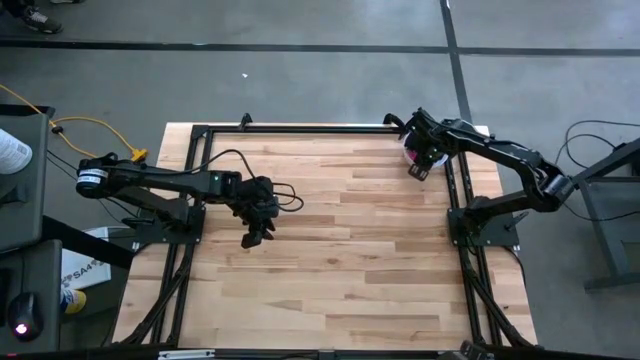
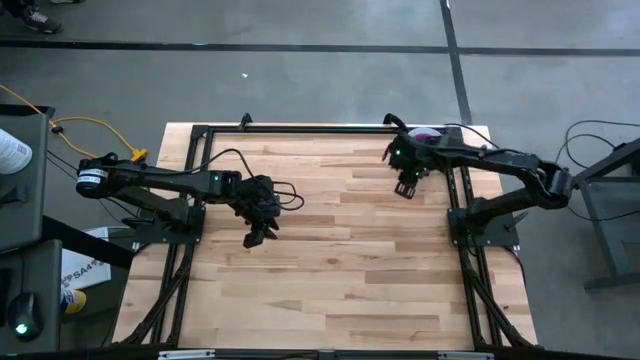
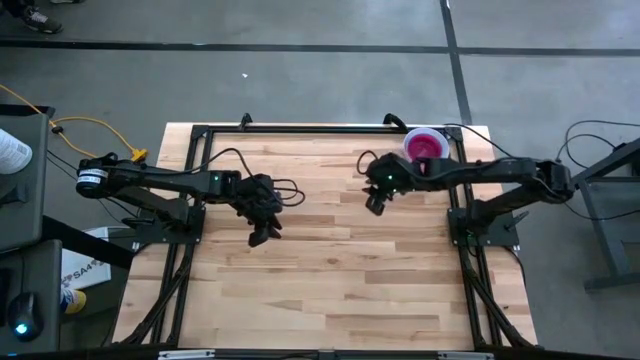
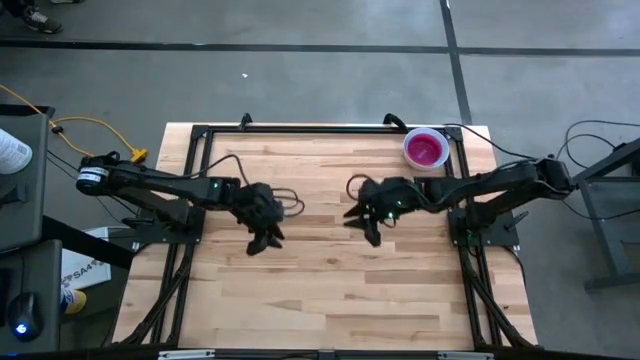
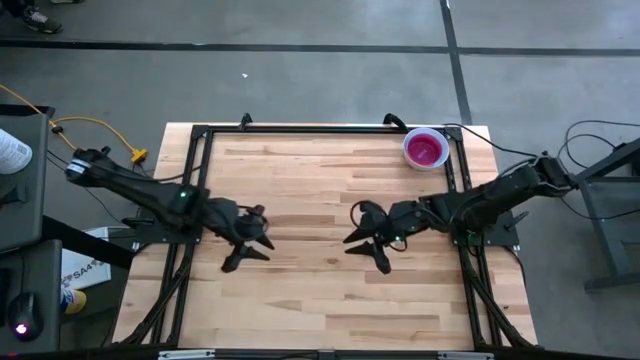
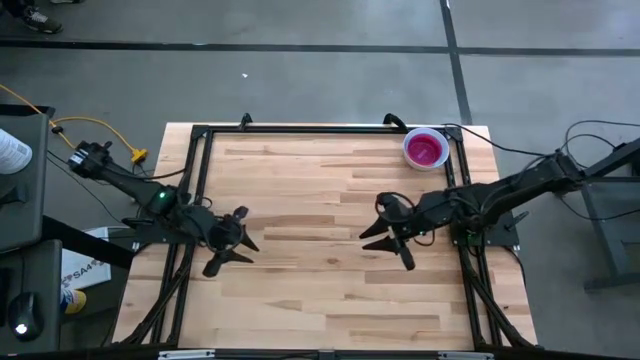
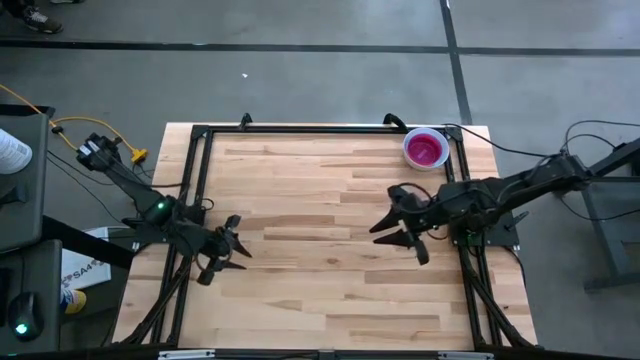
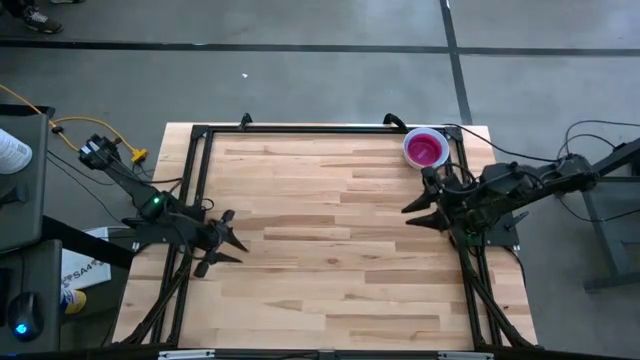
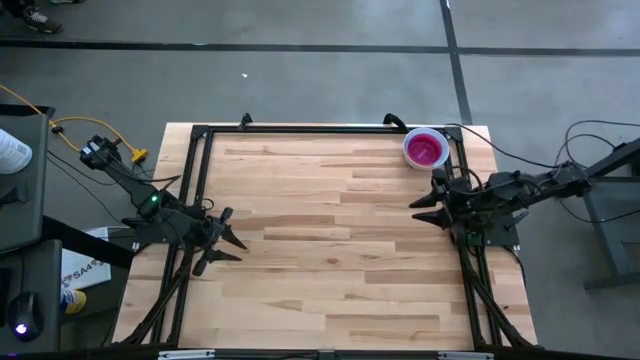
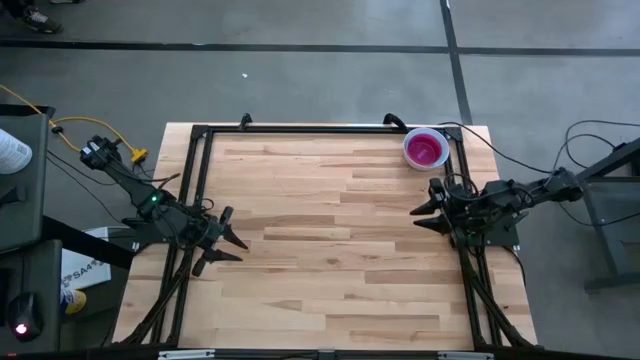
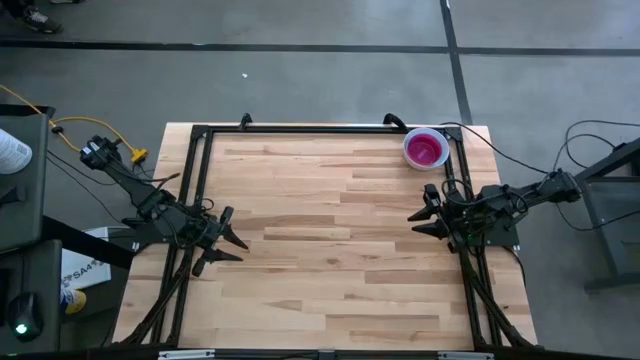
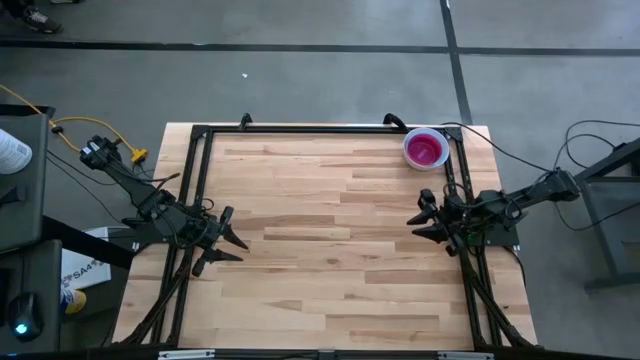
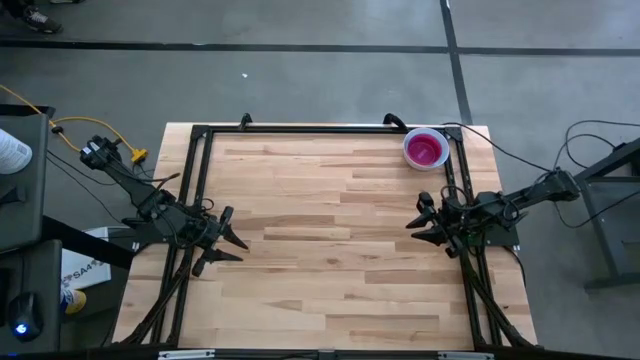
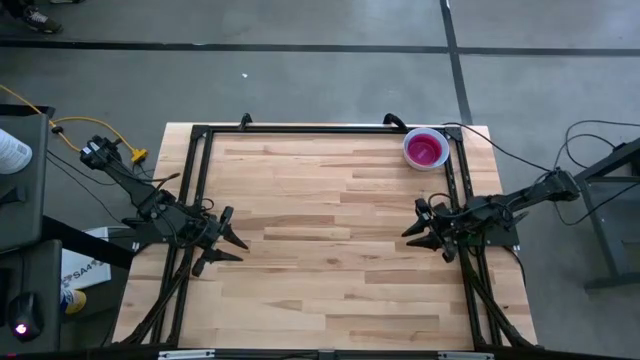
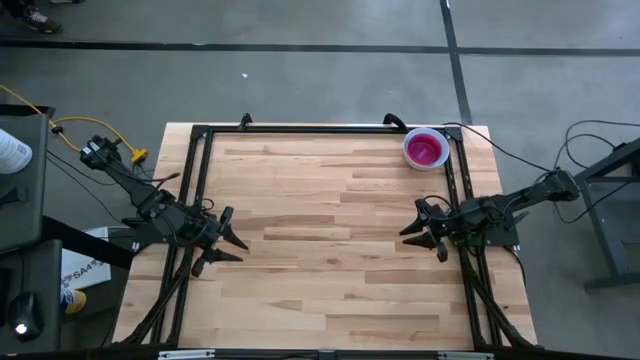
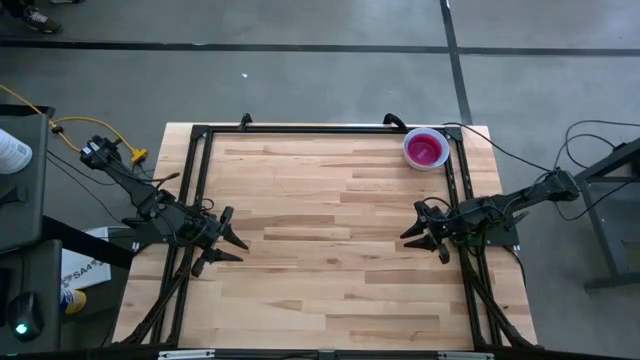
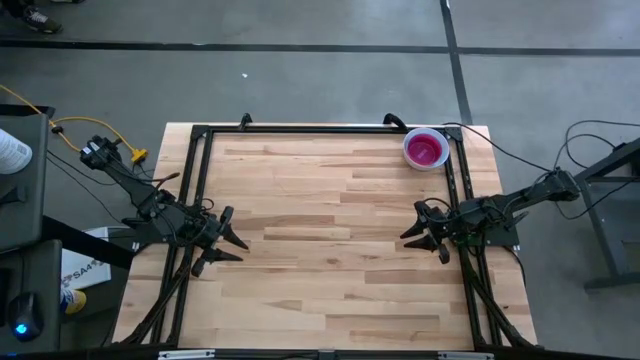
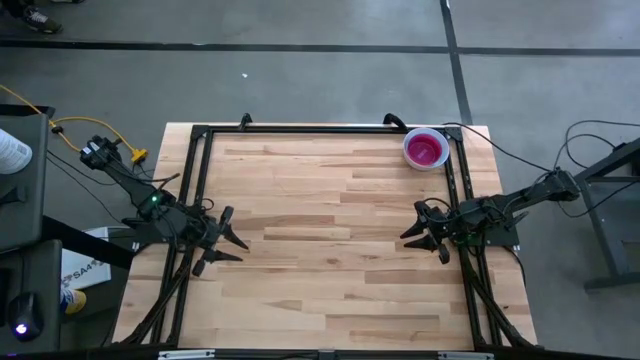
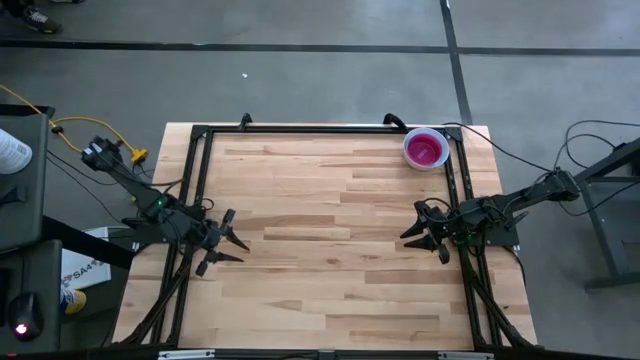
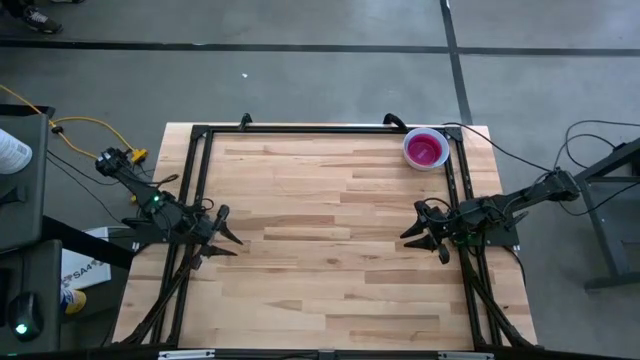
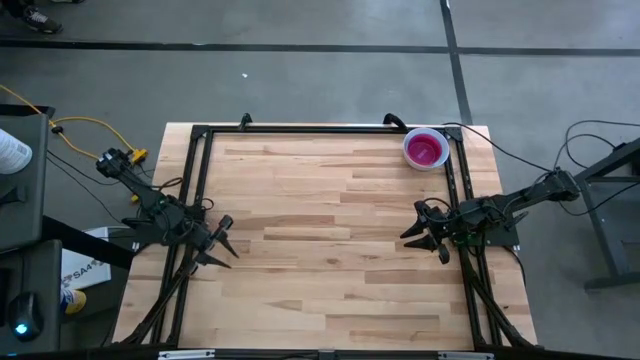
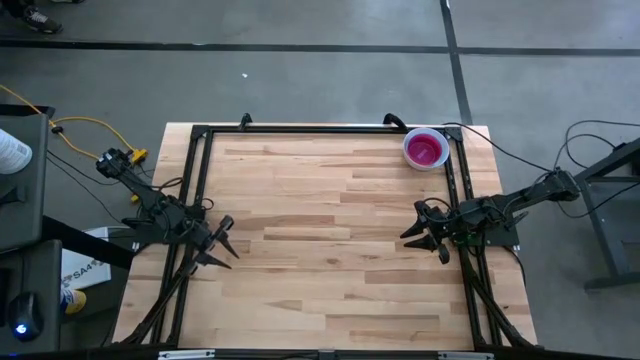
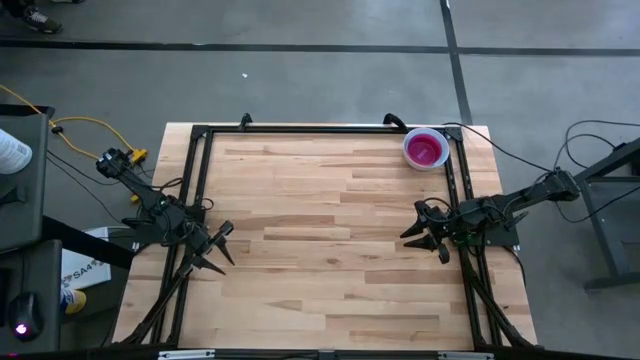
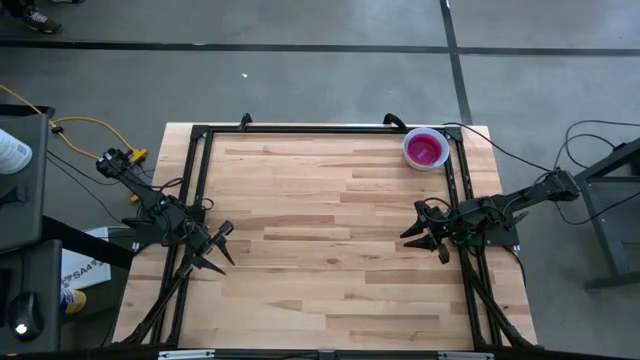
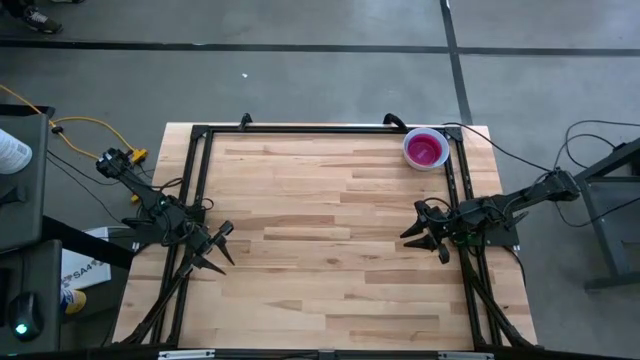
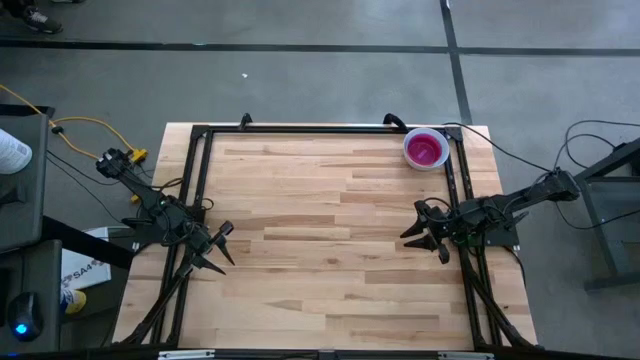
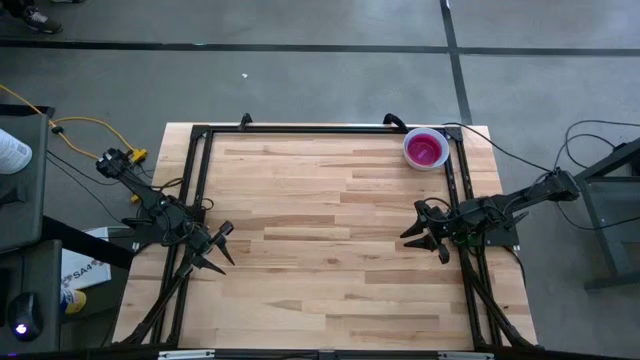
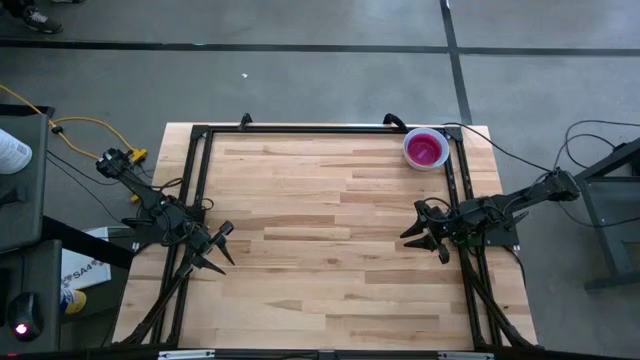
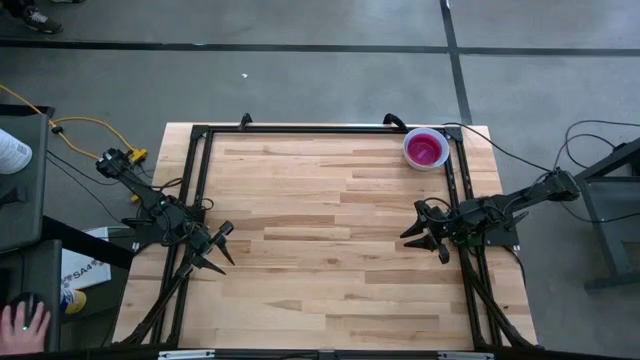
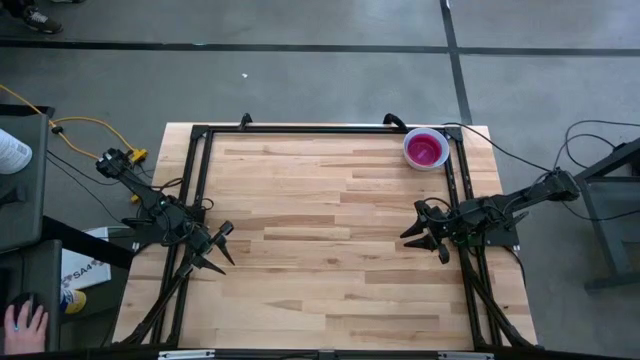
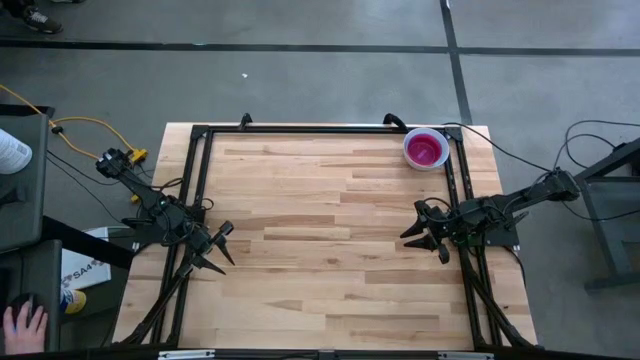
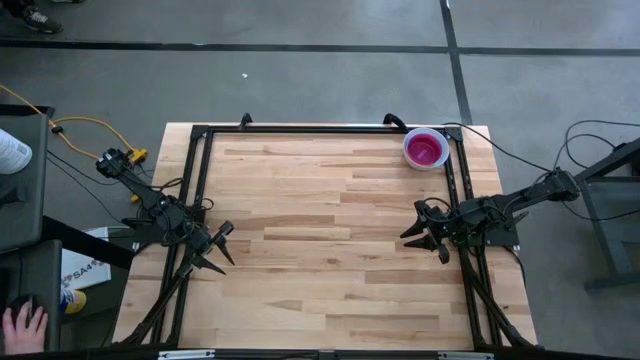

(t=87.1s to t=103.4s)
Return to Home Position

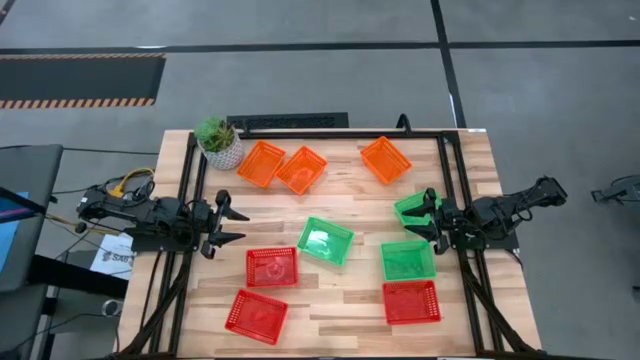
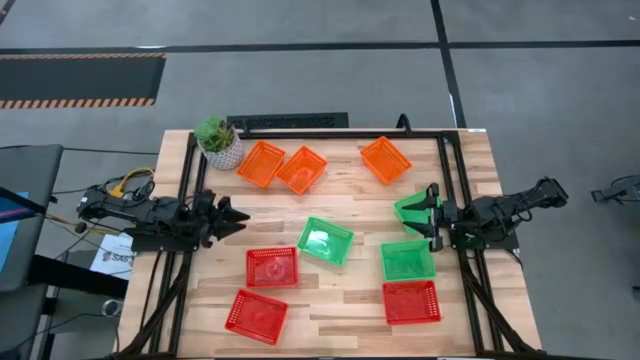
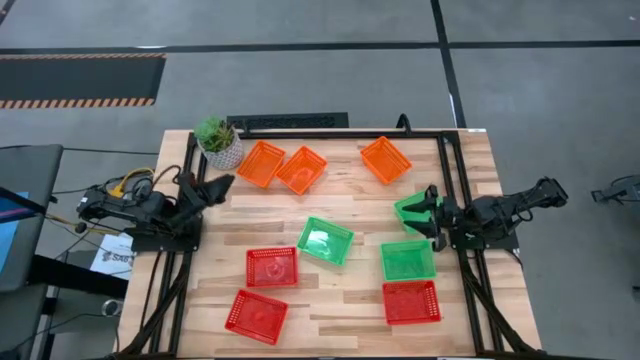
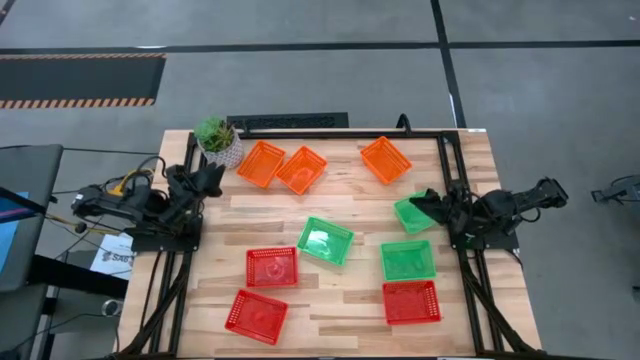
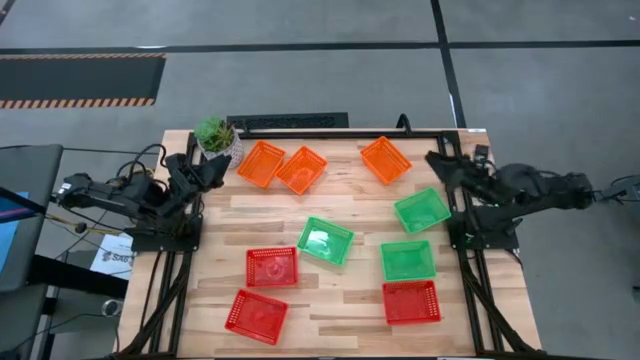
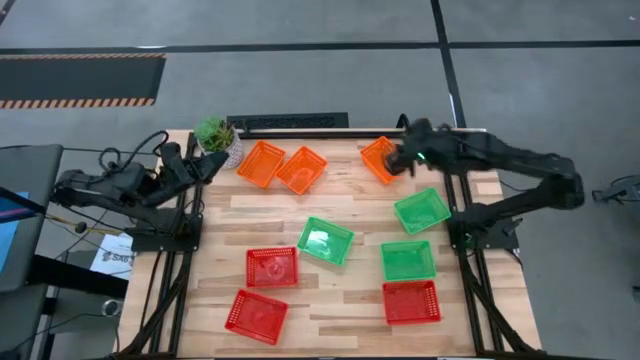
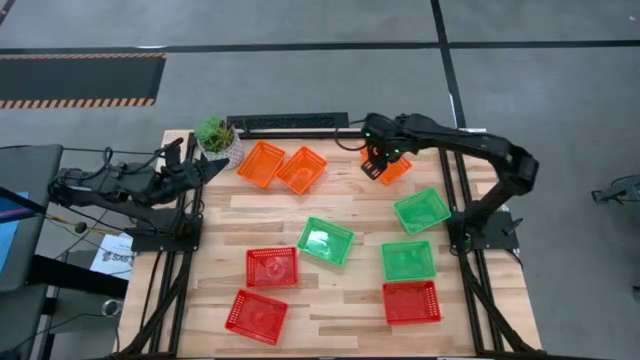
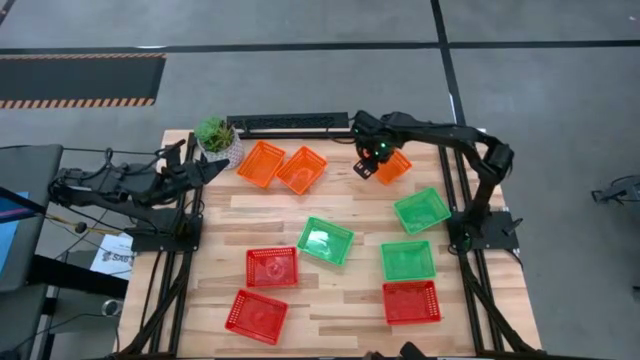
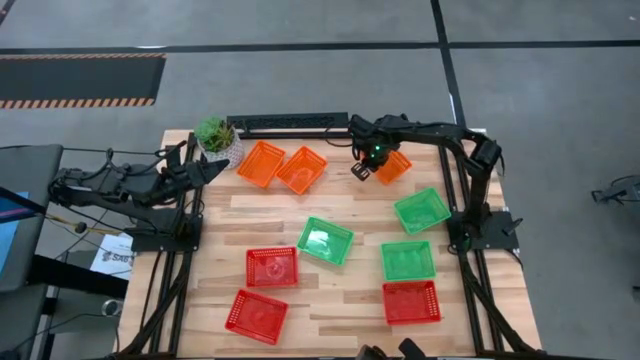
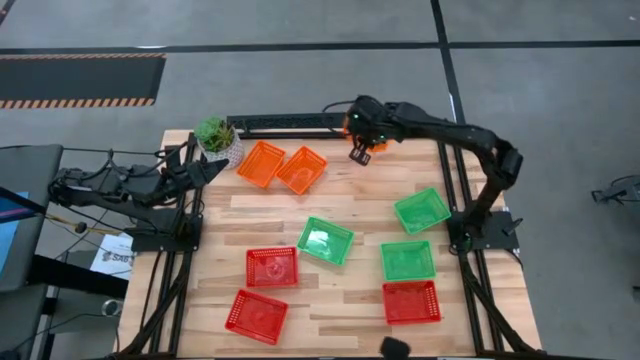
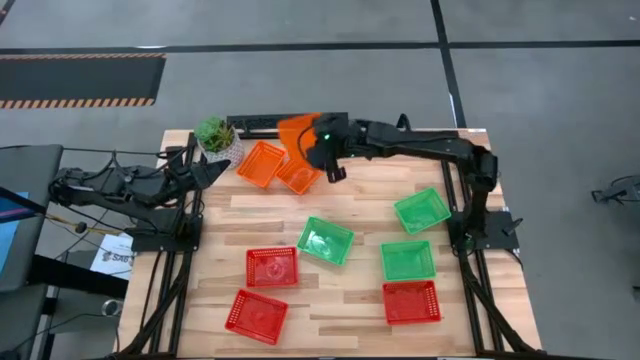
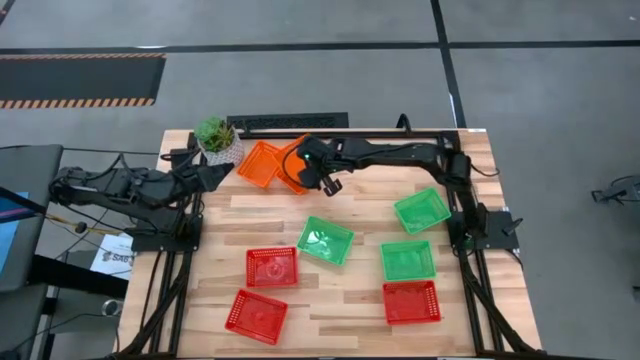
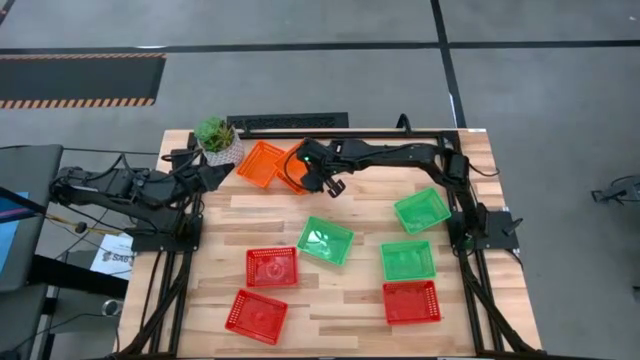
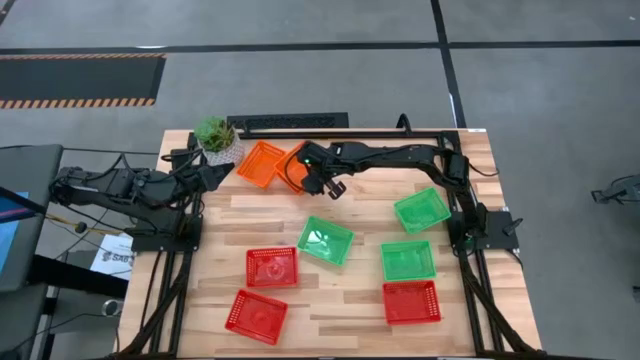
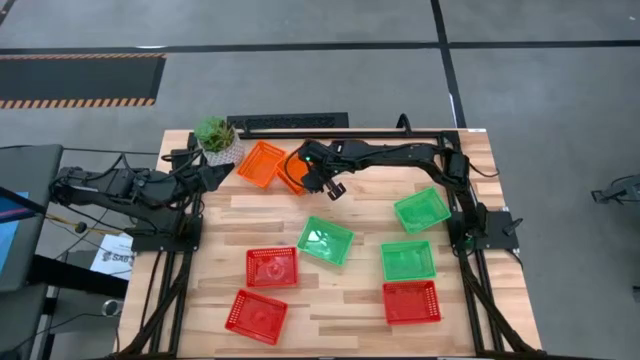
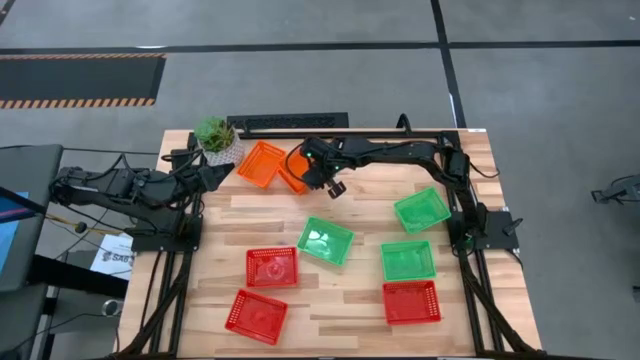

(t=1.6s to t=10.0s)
Stack the right orange bin on the middle orange bin
